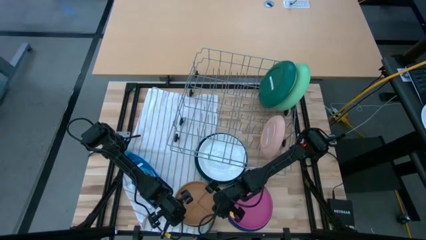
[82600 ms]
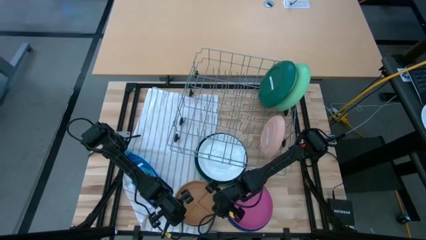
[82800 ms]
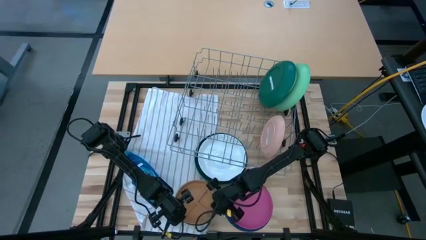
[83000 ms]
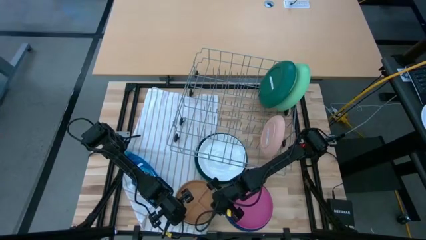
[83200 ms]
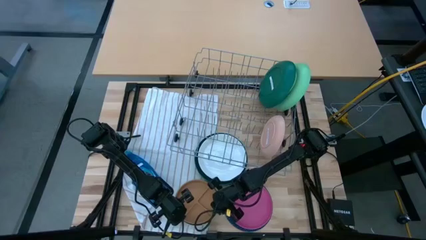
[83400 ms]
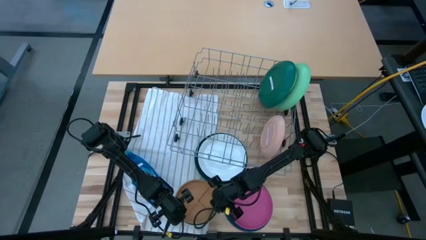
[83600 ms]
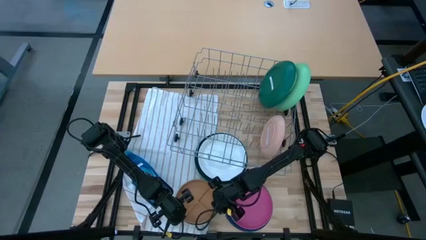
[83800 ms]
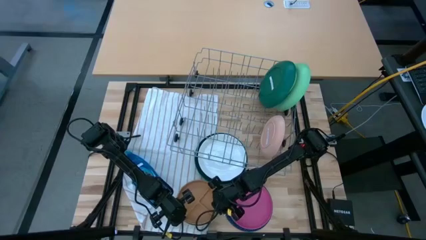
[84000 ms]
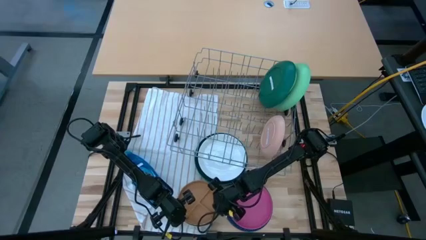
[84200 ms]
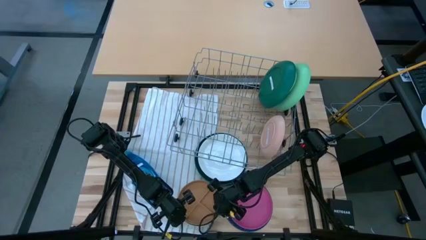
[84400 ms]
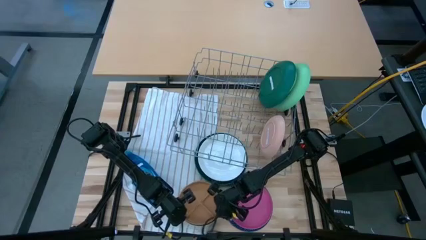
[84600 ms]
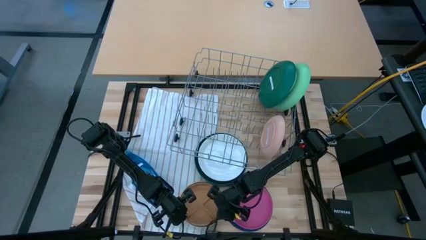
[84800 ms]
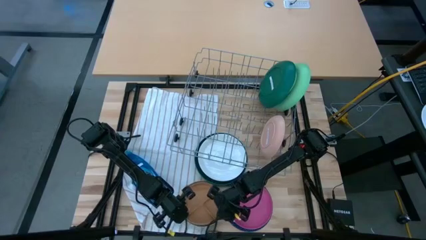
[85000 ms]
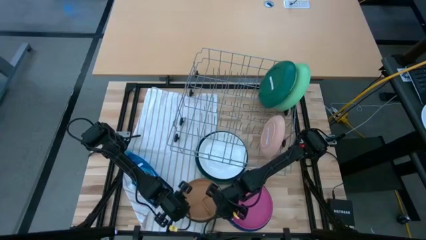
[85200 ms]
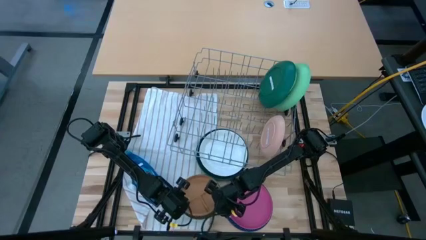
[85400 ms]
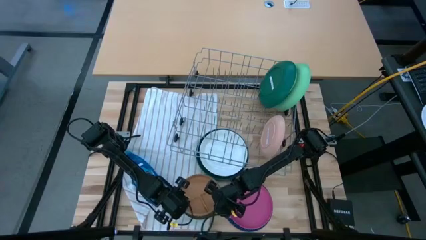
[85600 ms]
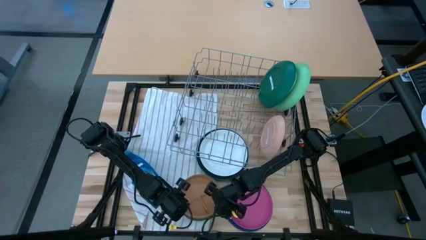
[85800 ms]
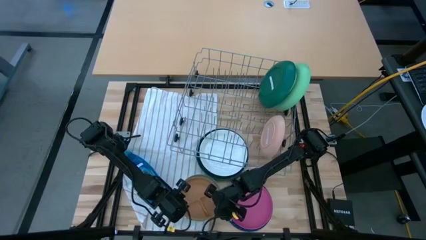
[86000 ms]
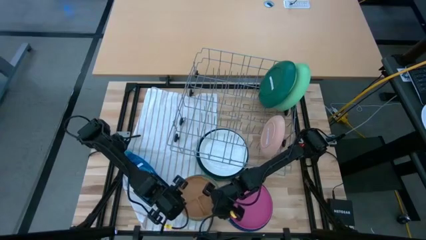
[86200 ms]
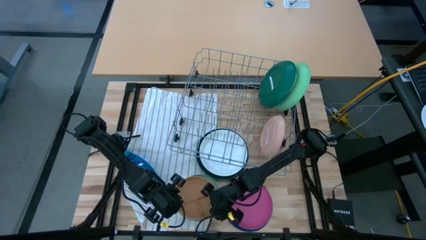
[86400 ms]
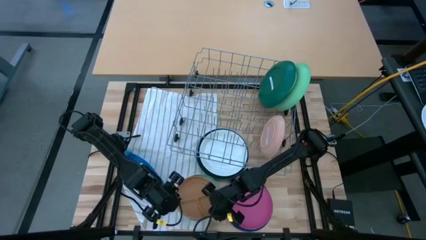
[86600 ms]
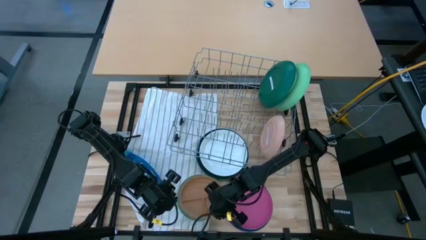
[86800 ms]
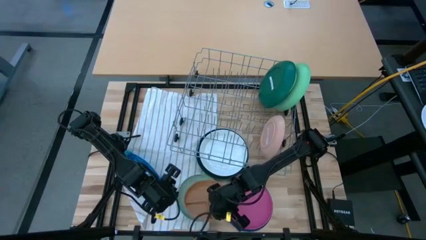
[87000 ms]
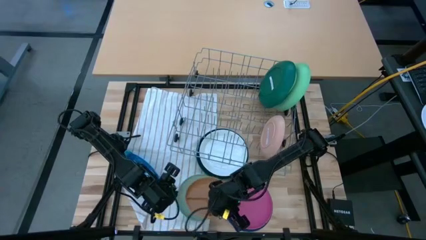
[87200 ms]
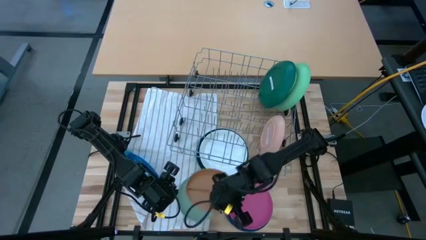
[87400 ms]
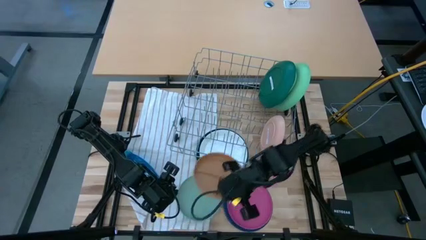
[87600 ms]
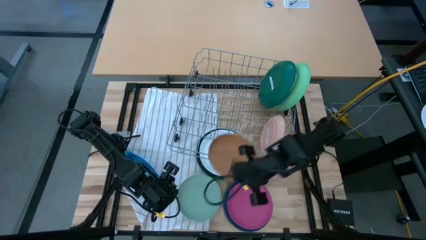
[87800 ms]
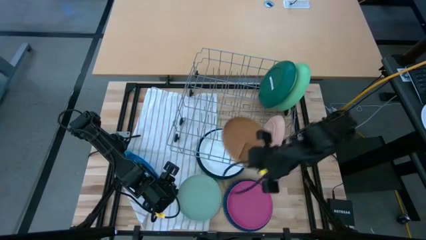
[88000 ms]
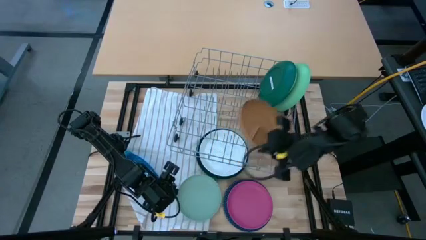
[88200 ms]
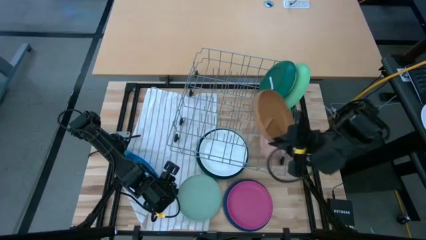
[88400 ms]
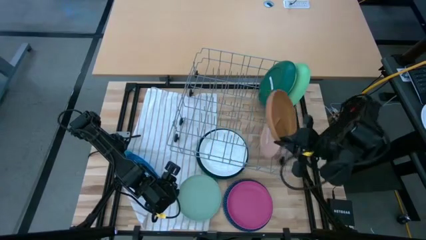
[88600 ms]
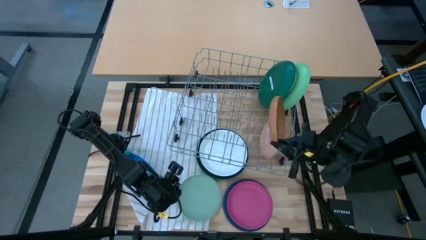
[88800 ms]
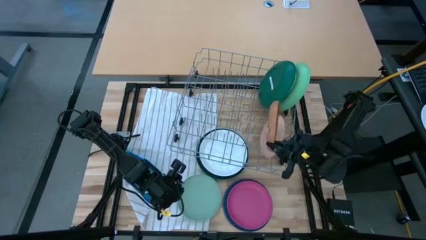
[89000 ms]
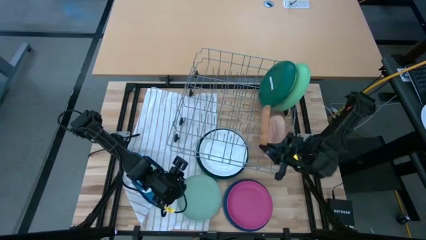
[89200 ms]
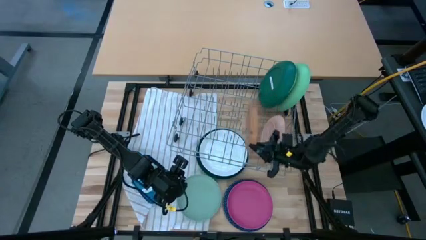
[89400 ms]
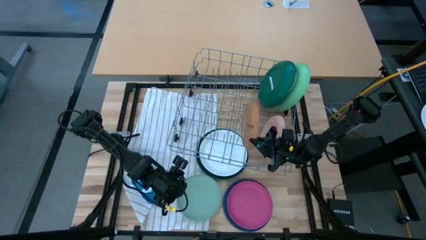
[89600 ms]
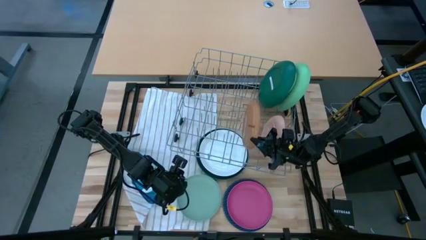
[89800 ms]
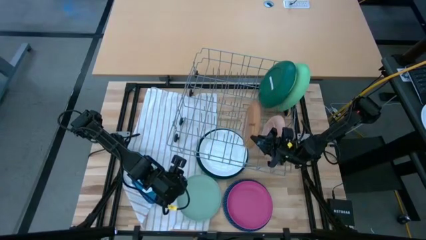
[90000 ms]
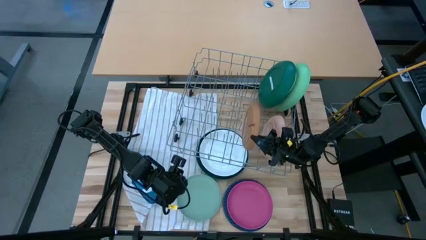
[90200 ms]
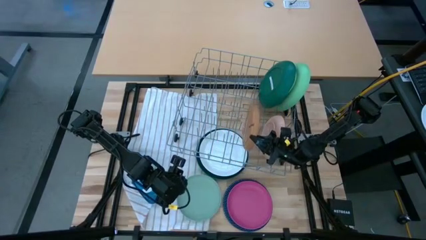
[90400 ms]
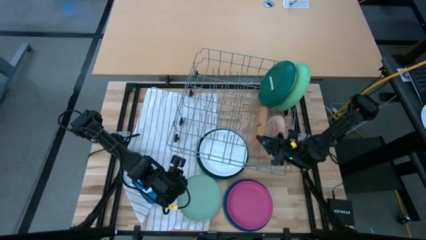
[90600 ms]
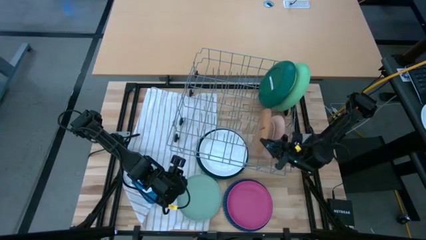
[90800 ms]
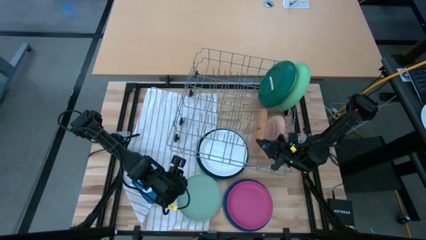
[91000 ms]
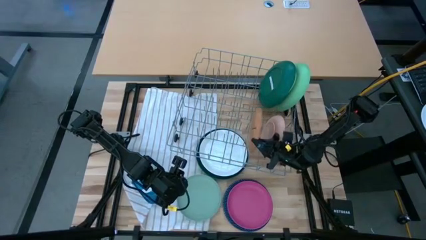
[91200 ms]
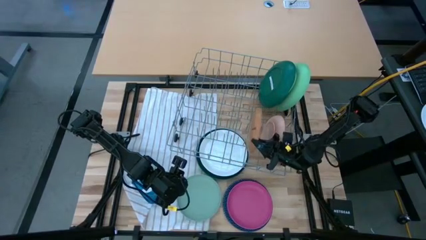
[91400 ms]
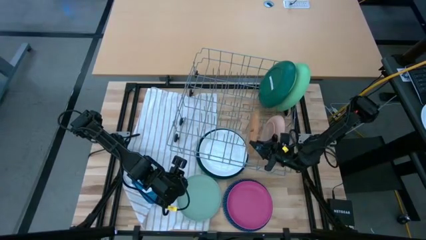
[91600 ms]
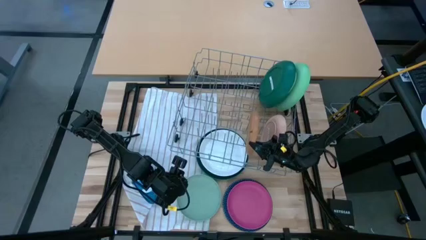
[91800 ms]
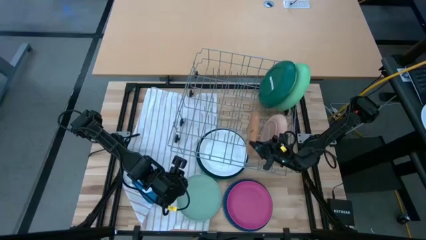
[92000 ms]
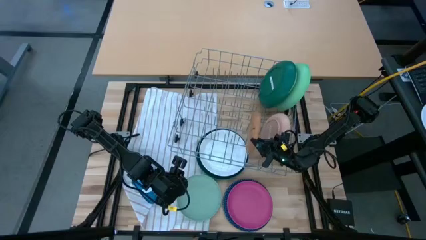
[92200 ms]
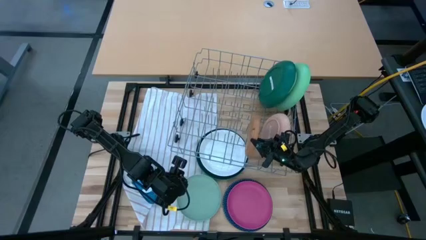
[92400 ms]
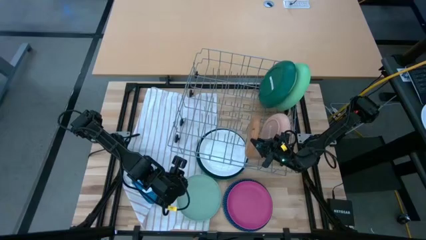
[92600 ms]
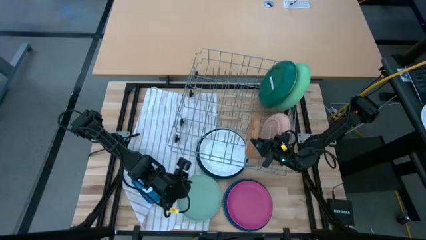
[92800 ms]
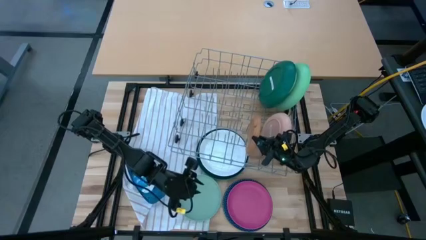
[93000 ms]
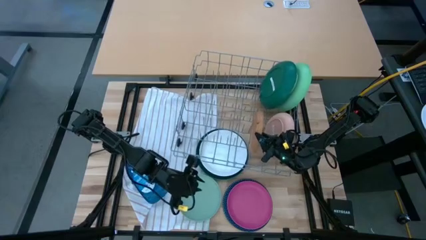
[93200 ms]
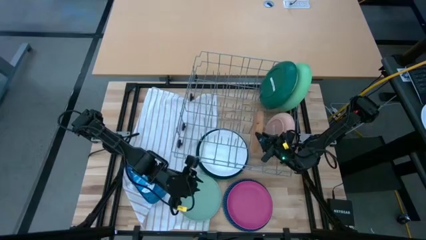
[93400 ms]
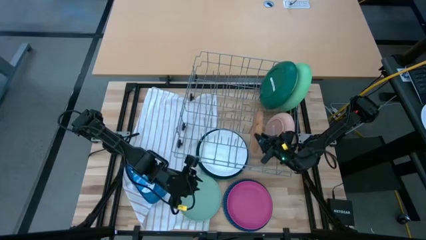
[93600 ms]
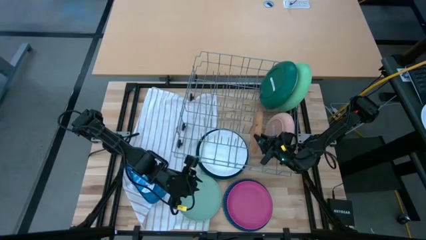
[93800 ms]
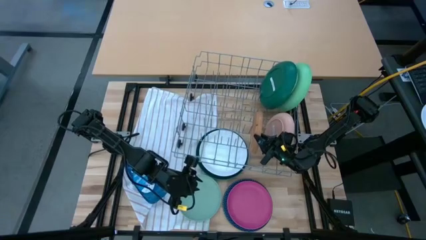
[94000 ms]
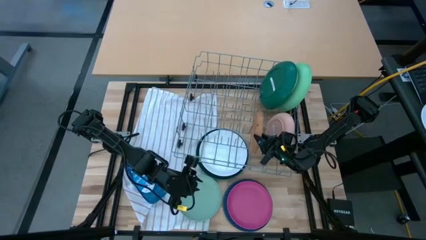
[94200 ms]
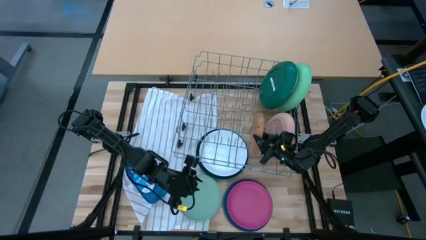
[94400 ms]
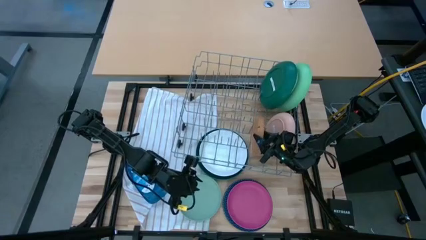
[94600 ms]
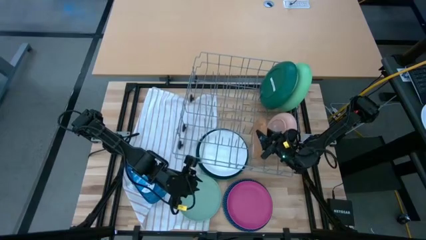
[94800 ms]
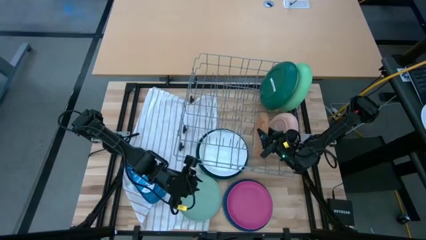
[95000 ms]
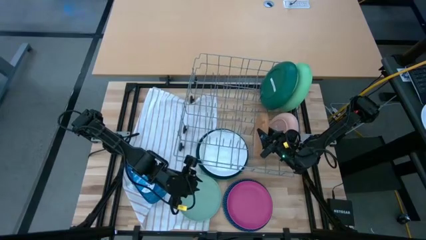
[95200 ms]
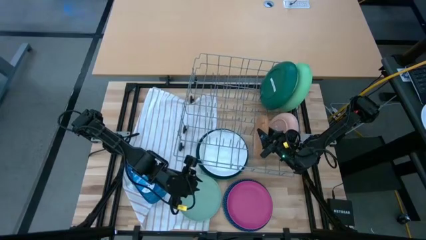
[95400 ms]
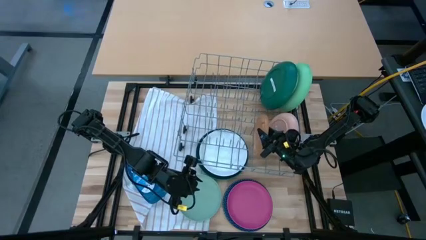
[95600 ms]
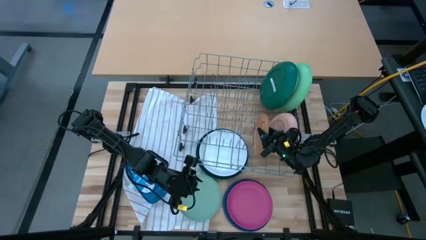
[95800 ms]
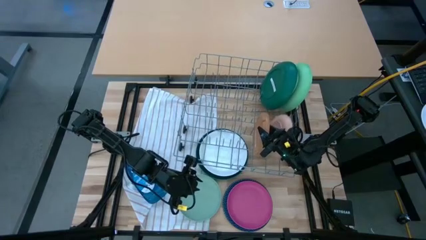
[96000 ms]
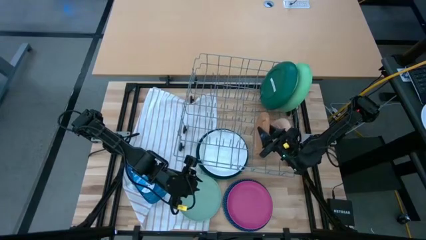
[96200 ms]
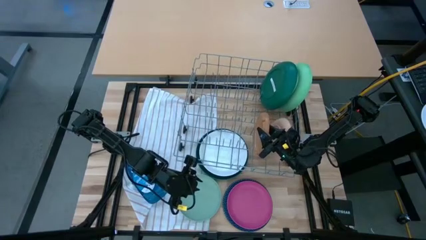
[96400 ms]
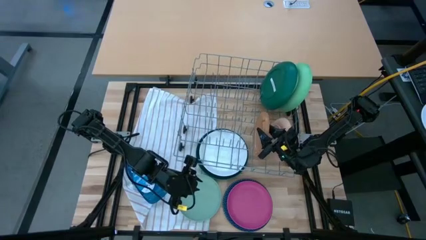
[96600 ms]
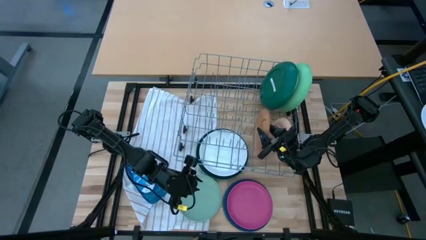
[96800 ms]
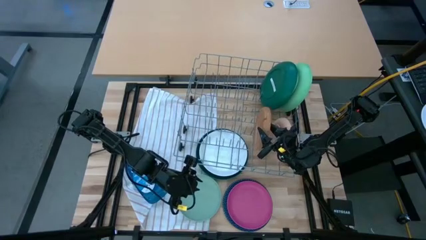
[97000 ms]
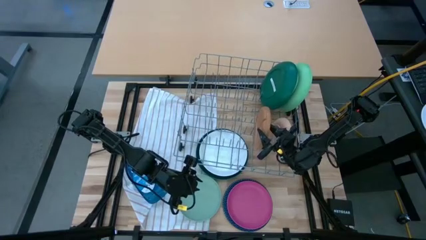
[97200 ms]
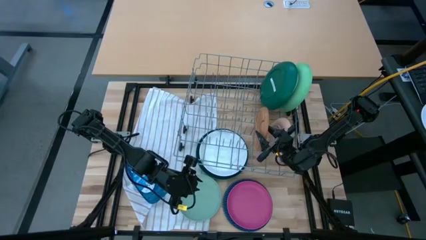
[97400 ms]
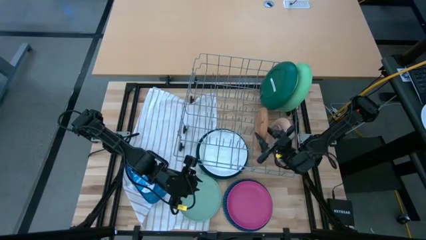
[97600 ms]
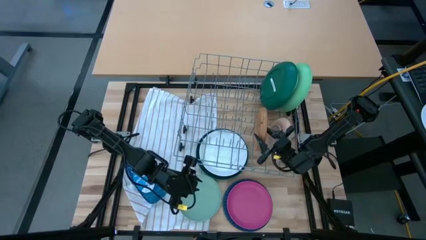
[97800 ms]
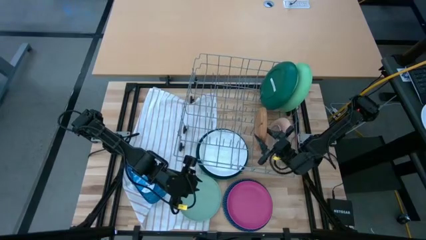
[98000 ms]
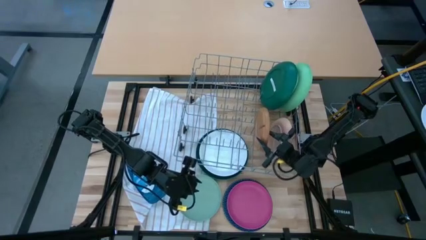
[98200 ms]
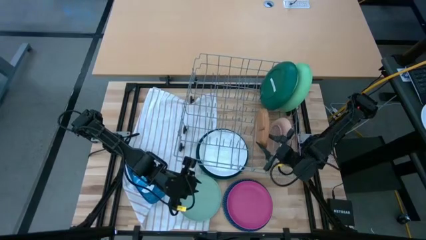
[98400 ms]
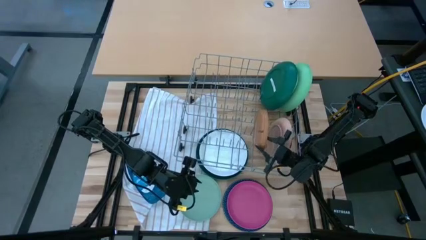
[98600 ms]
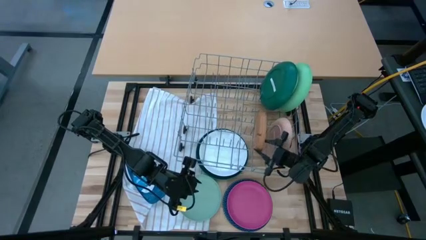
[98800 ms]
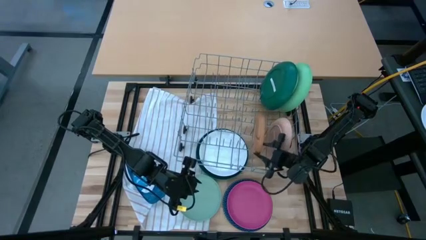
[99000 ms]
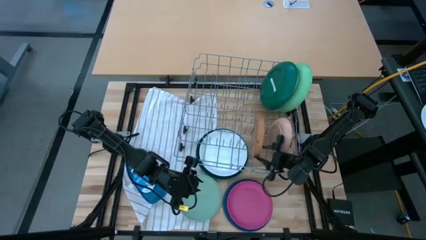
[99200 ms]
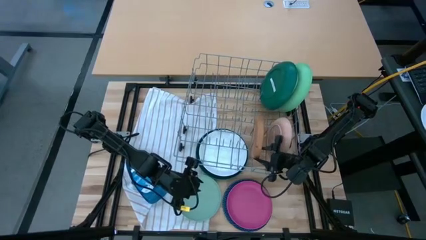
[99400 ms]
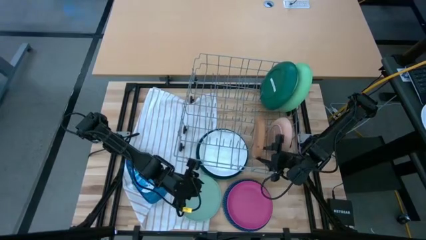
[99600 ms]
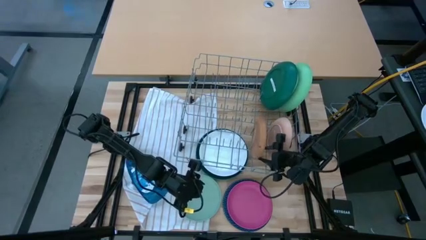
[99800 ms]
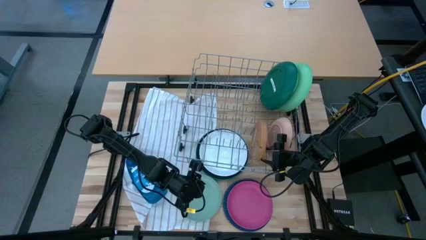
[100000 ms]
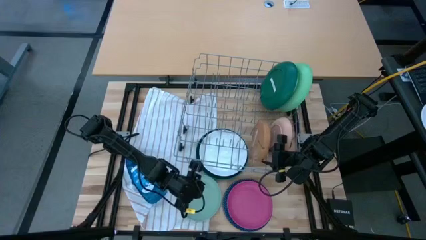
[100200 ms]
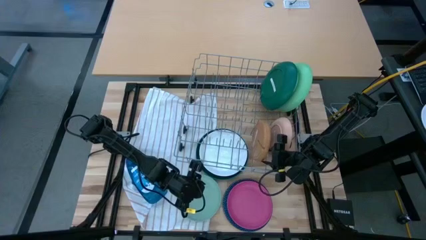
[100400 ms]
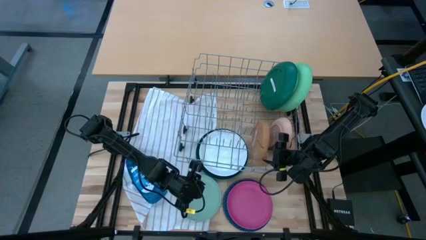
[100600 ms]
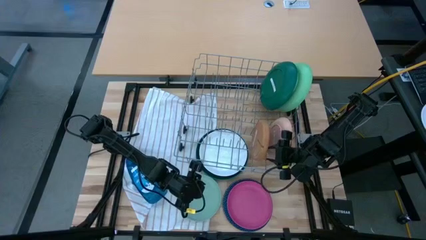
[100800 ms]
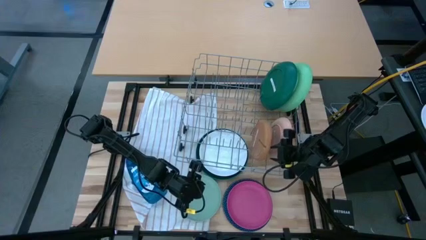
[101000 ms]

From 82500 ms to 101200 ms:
Task: Sort dishes
Put the brown plate in the dish rack
